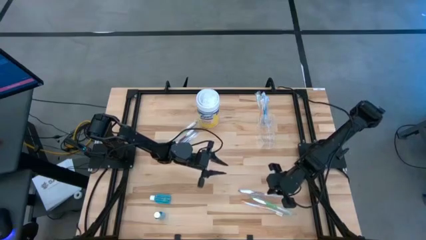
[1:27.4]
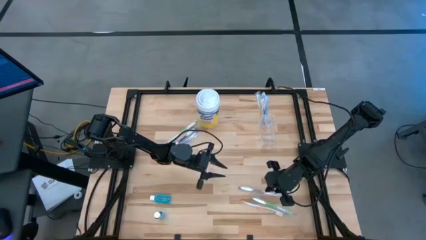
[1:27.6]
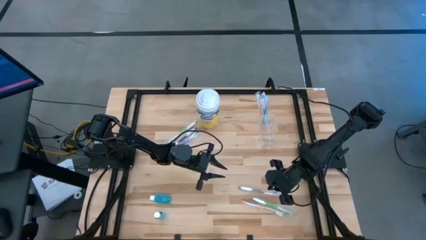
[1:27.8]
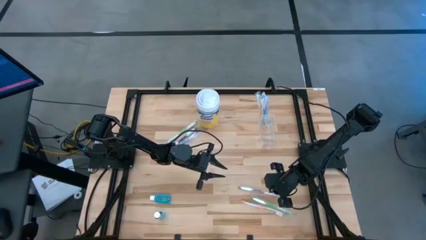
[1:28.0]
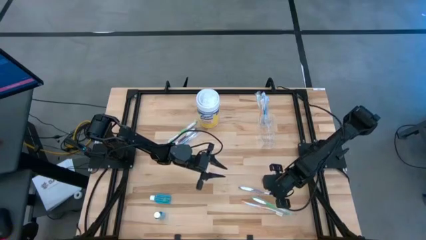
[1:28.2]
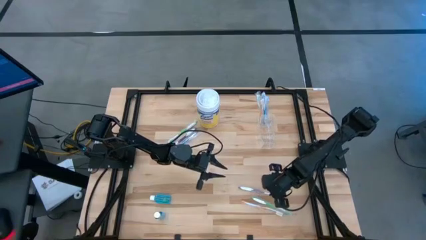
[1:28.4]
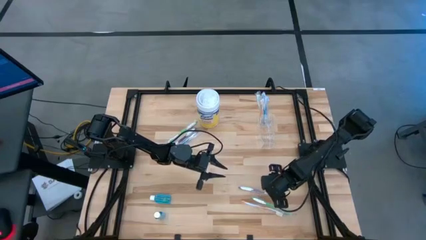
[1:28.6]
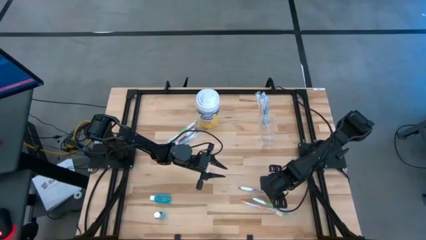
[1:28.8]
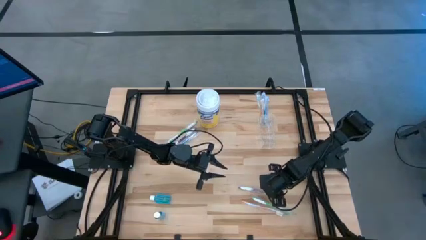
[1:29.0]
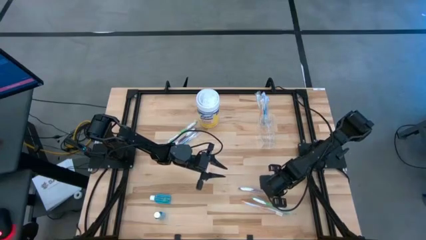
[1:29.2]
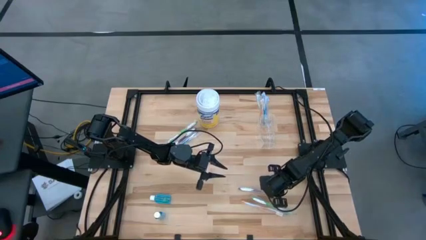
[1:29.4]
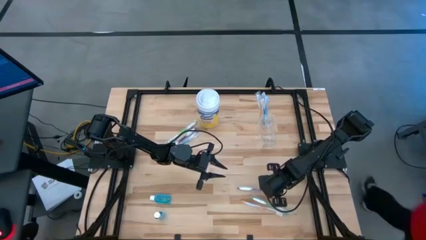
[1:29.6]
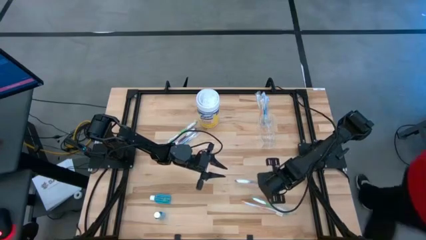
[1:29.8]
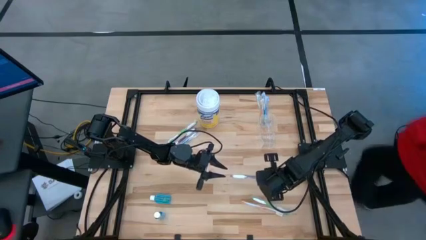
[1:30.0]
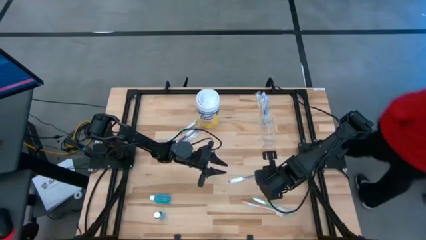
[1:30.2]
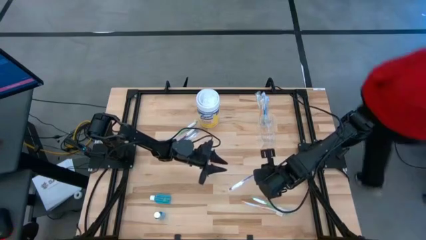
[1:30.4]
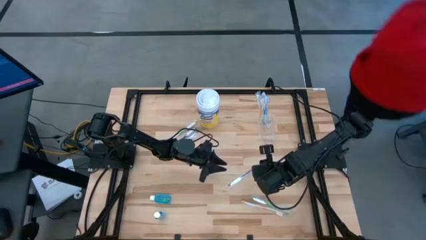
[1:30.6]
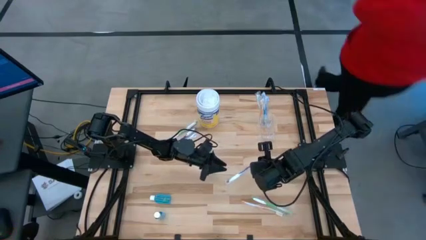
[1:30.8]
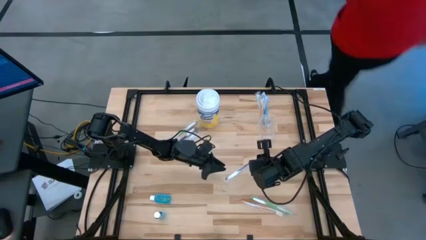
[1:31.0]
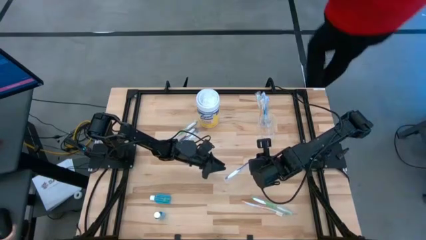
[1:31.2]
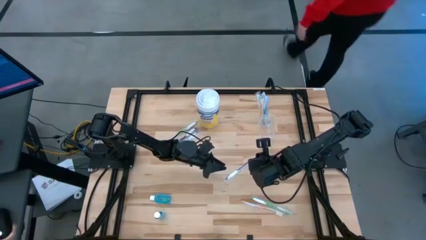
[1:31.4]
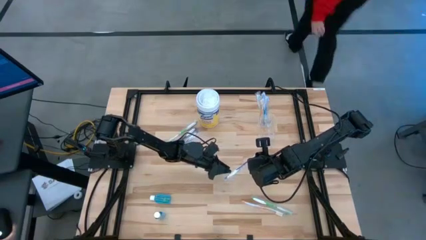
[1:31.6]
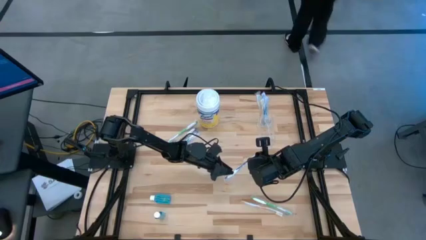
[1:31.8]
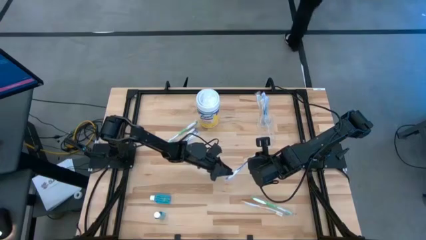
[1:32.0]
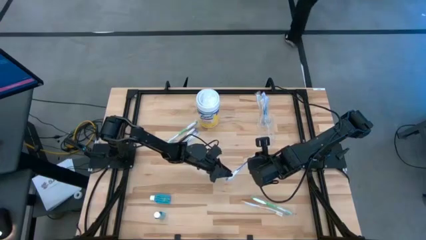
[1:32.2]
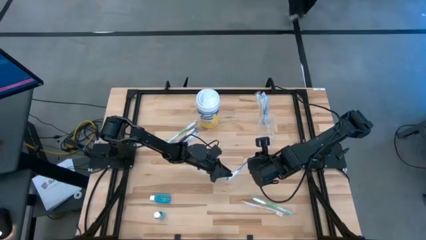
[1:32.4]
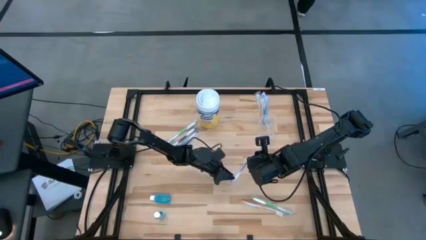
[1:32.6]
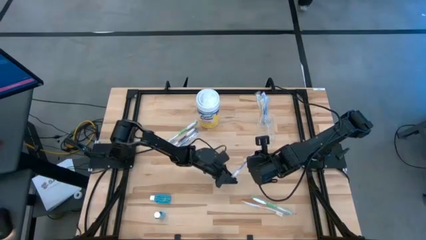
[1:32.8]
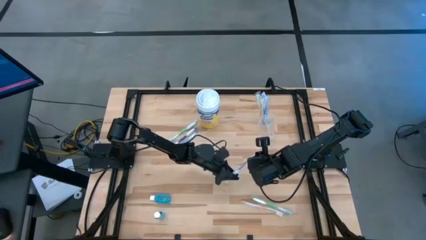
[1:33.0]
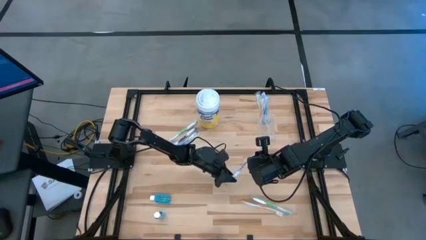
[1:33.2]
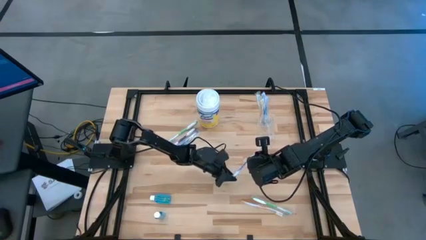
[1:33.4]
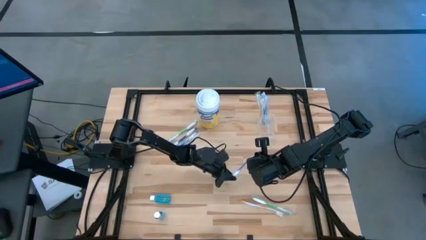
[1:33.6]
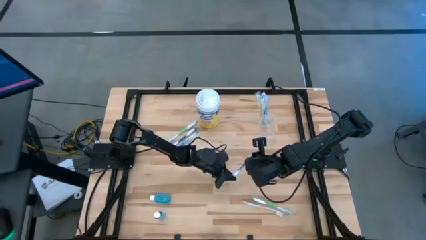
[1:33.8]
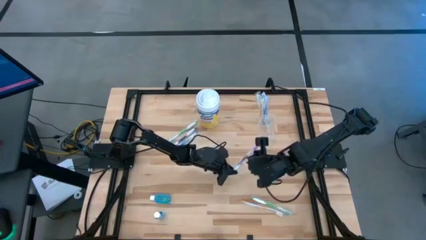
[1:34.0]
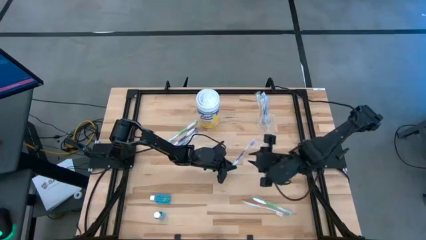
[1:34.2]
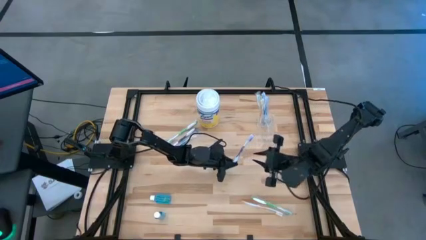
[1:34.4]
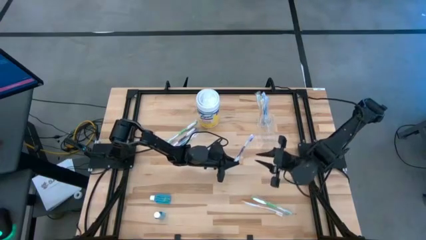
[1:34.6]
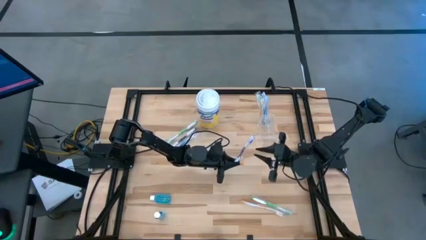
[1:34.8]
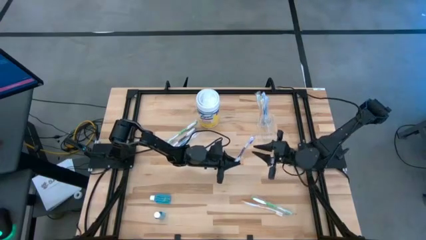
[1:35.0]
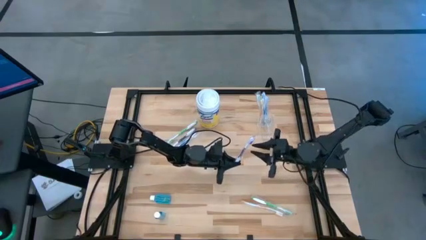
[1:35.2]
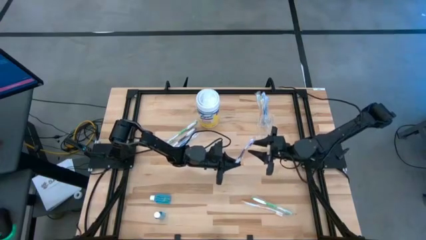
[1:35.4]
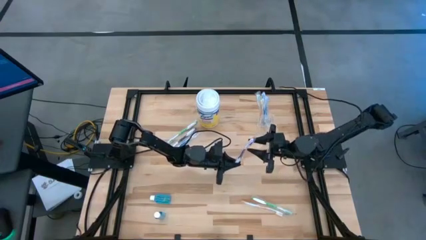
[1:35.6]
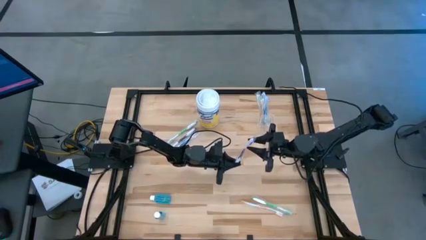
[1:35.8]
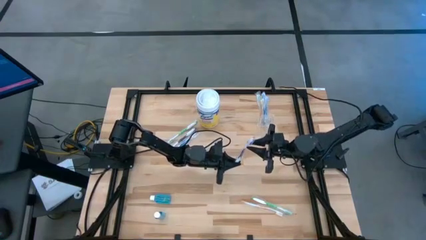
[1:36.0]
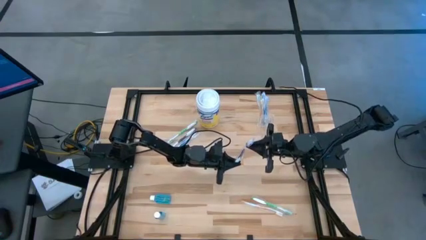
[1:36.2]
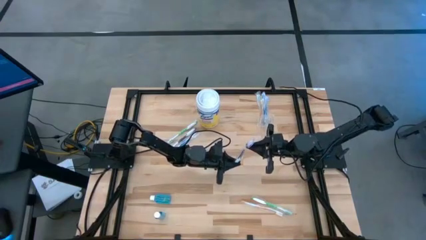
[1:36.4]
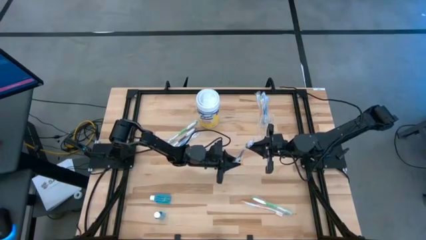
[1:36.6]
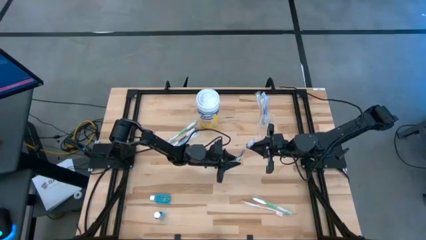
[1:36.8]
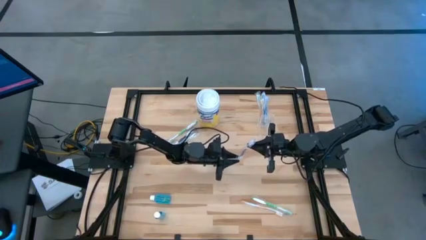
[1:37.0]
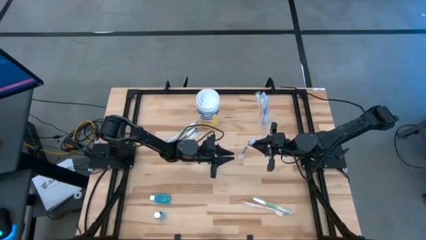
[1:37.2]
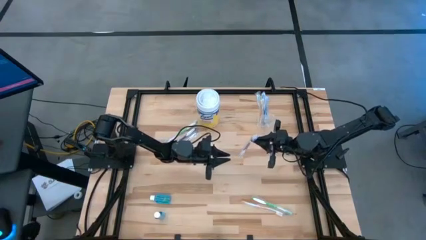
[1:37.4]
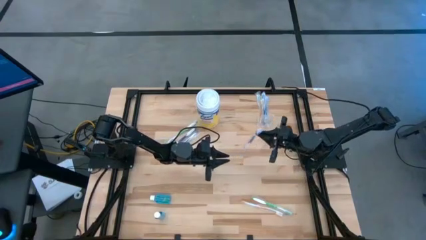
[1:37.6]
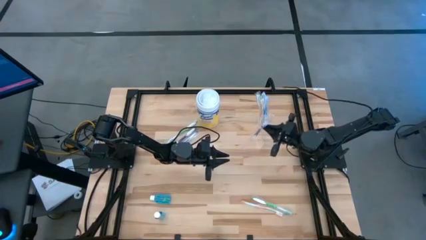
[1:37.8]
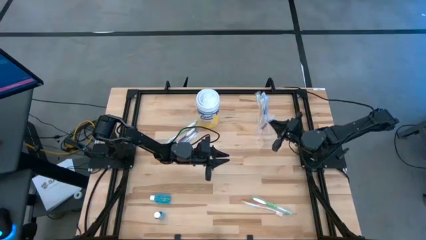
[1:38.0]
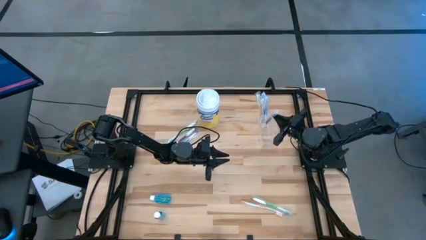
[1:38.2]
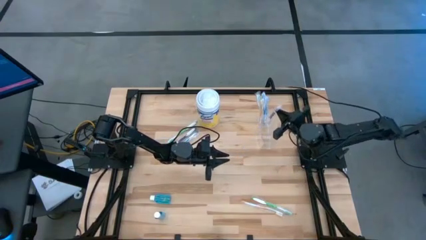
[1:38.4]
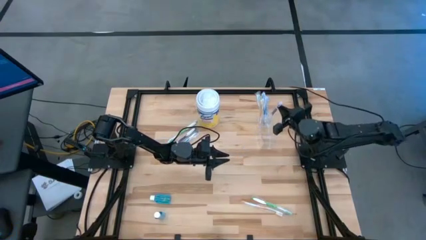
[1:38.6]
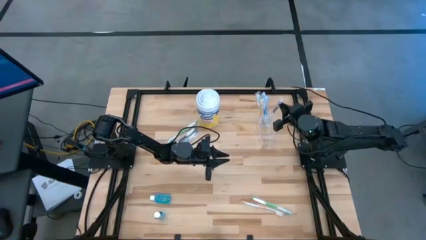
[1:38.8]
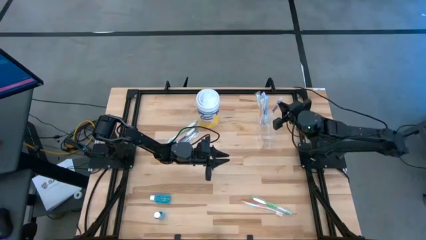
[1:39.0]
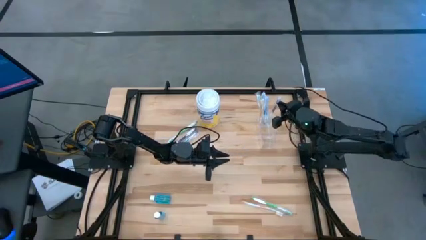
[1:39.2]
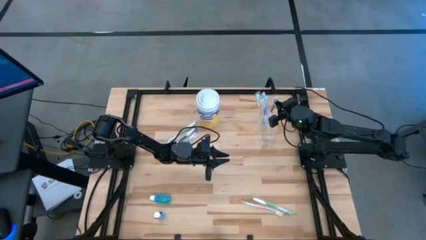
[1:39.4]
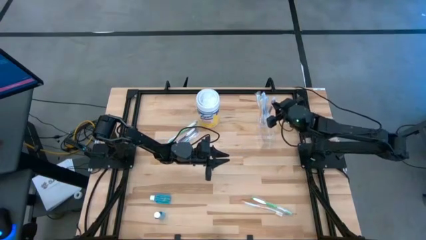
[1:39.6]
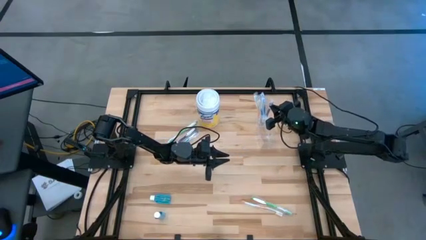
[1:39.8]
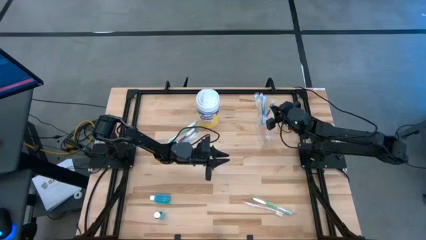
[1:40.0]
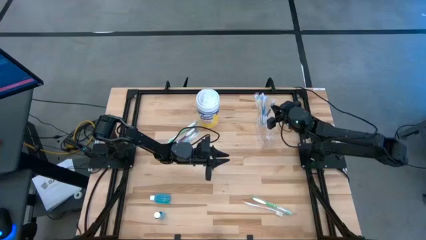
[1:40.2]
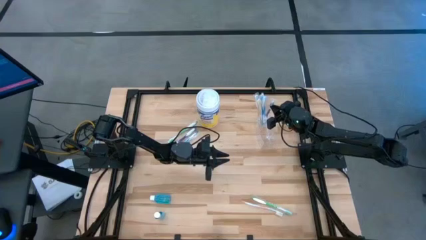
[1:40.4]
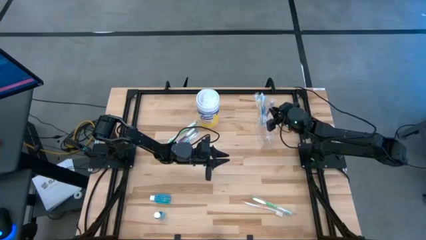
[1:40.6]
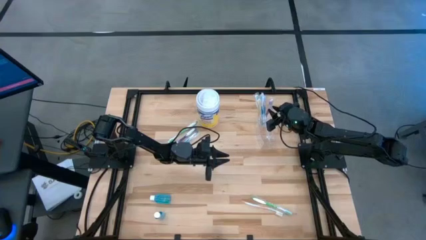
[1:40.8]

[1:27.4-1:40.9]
Task: Pick & Place toothbrushing station
Put the bottom purple toothbrush into the transparent organizer

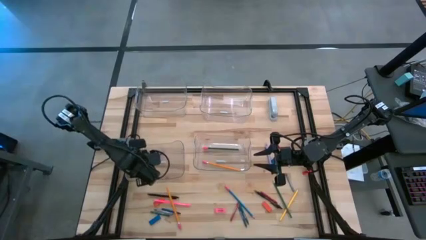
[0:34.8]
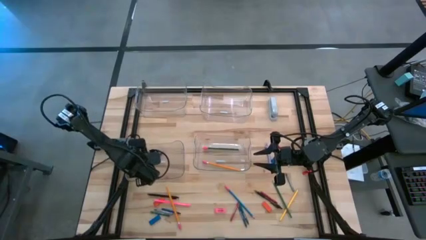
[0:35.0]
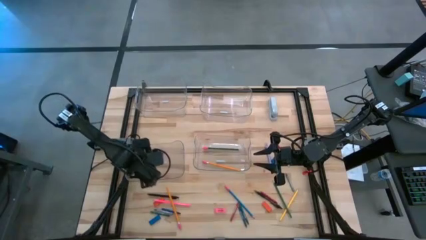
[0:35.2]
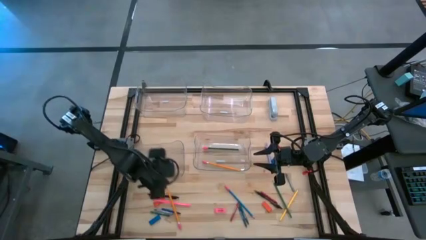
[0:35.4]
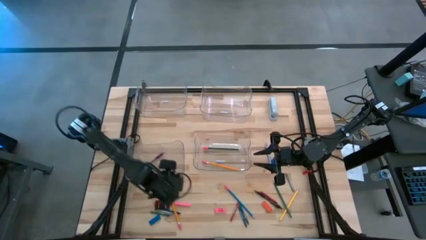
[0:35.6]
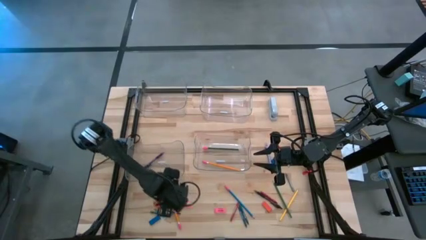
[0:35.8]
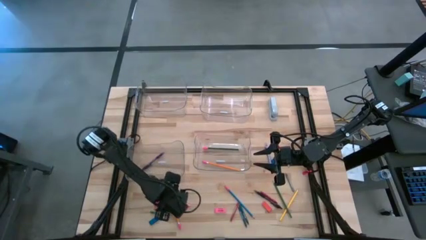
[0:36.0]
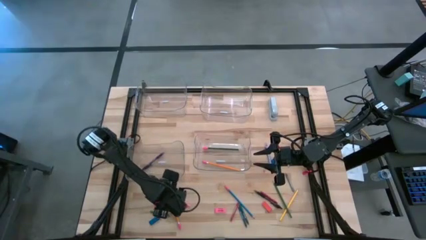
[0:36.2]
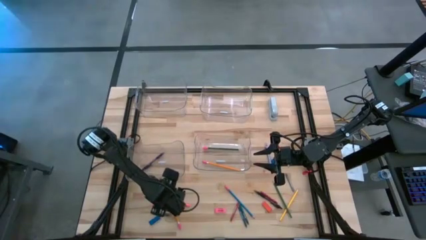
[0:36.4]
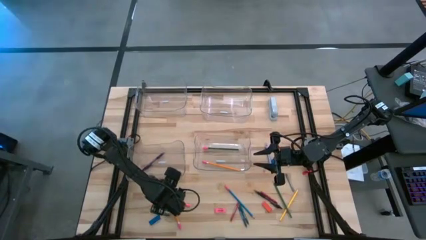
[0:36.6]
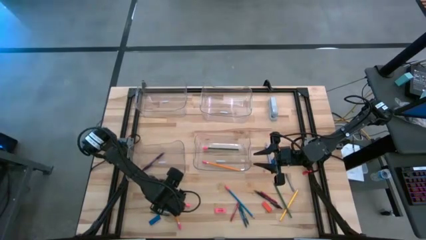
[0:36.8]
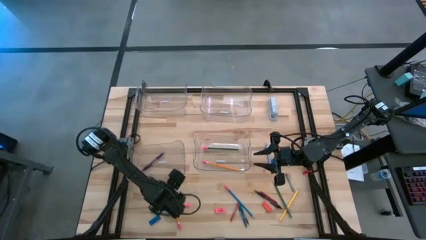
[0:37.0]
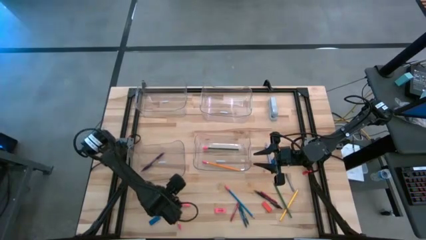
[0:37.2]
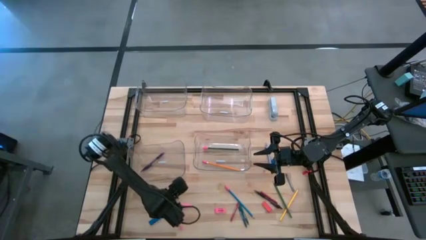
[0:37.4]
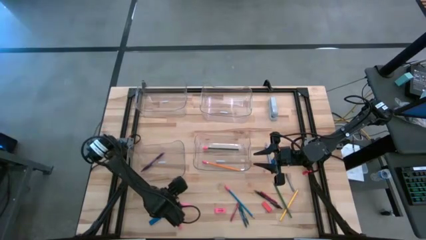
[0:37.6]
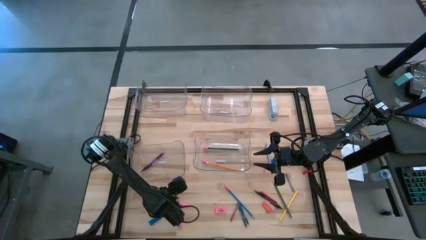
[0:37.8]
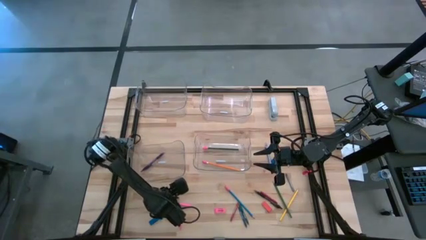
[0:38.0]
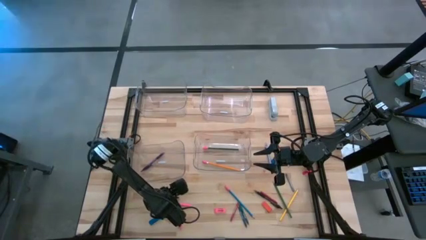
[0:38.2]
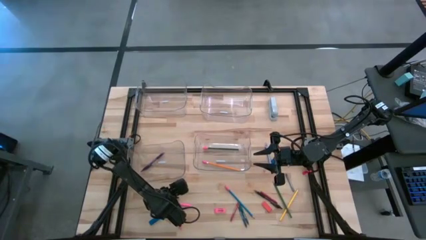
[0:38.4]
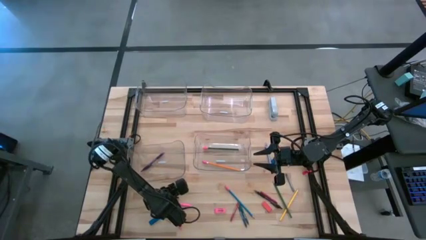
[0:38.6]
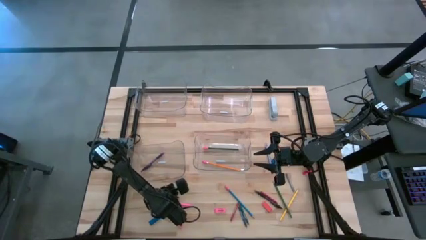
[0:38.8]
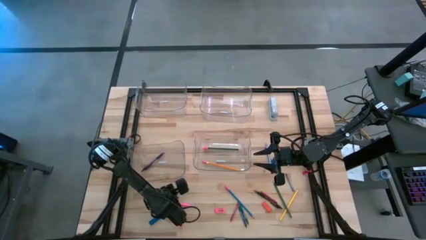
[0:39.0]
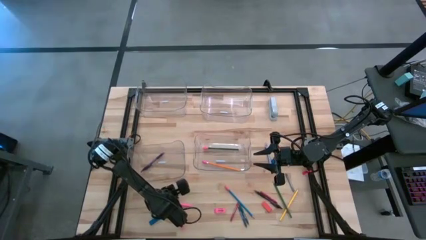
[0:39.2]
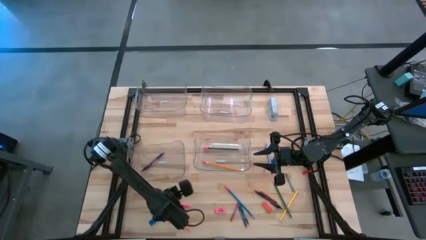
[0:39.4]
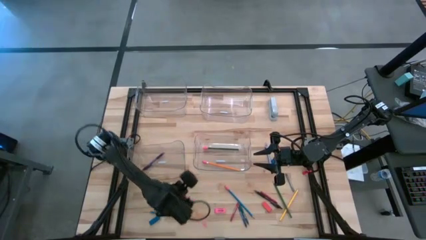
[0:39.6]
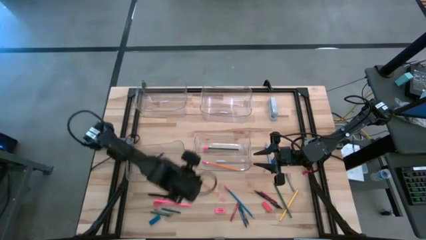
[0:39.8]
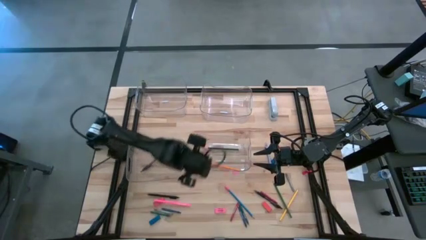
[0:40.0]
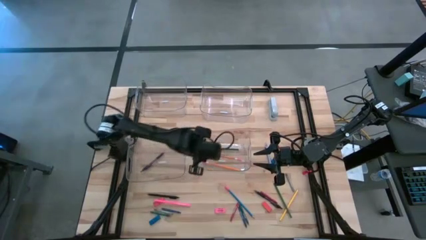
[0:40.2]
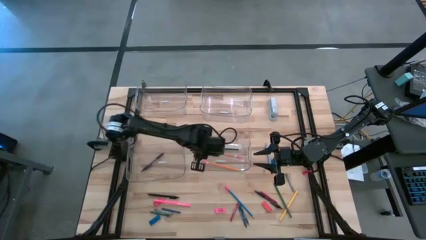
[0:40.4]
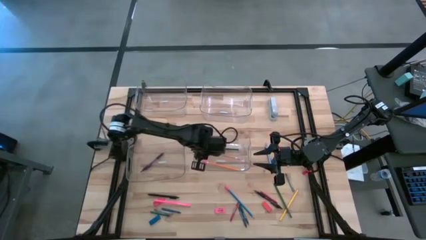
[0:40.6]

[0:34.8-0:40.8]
Task: Sort crayons/erasers/pens/pencils in bins
Put the orange pencil into the bottom right transparent bin
